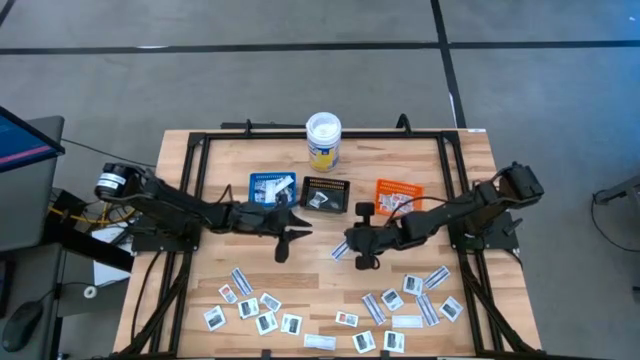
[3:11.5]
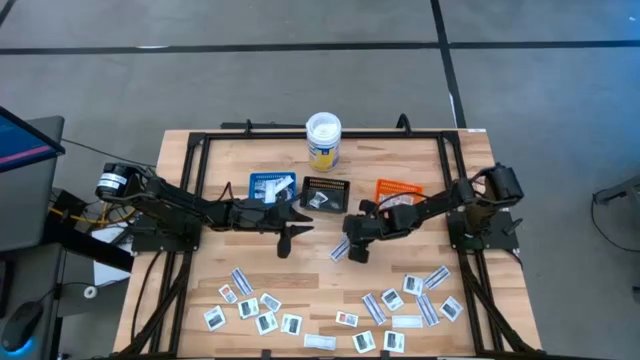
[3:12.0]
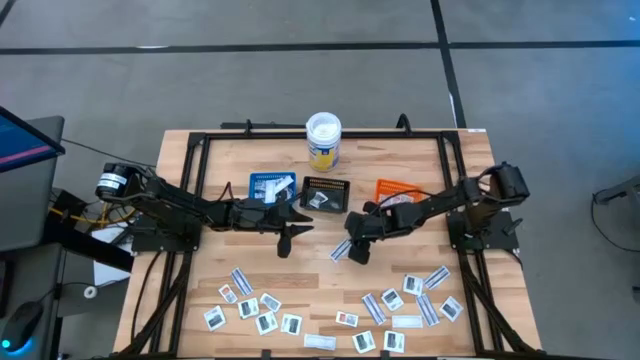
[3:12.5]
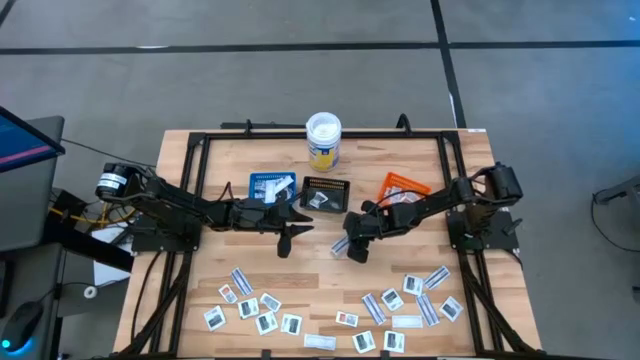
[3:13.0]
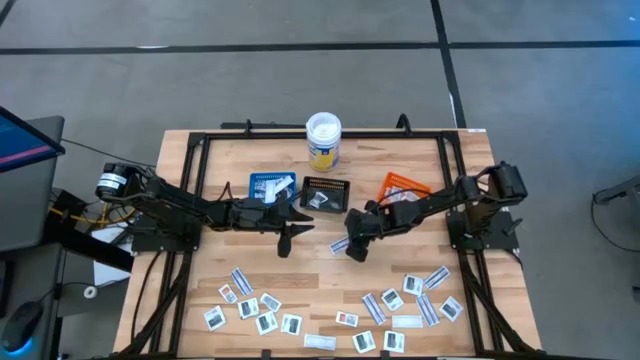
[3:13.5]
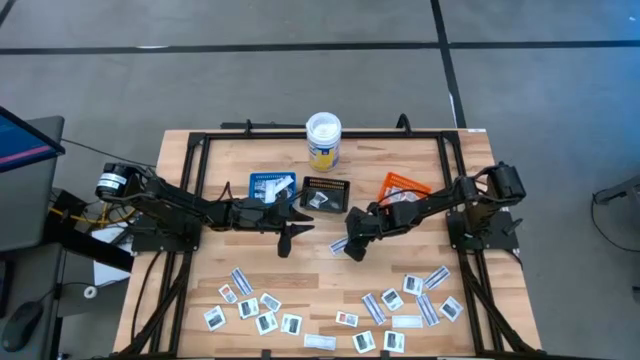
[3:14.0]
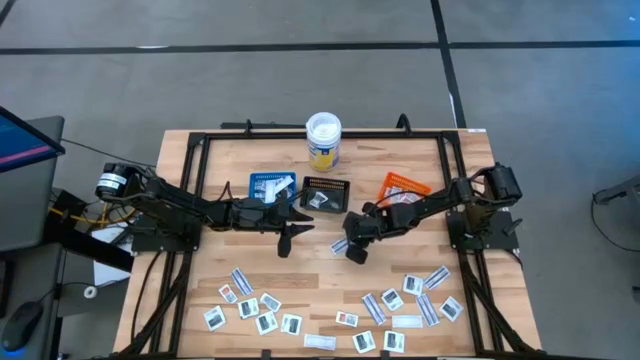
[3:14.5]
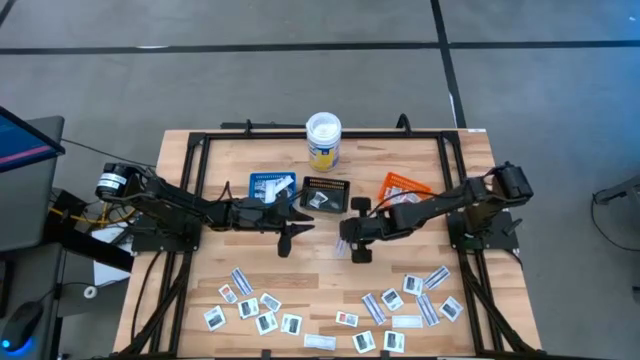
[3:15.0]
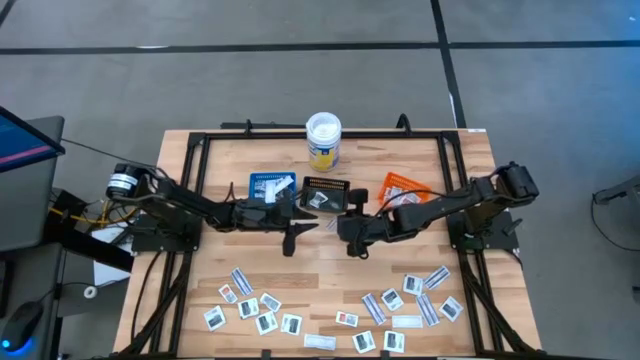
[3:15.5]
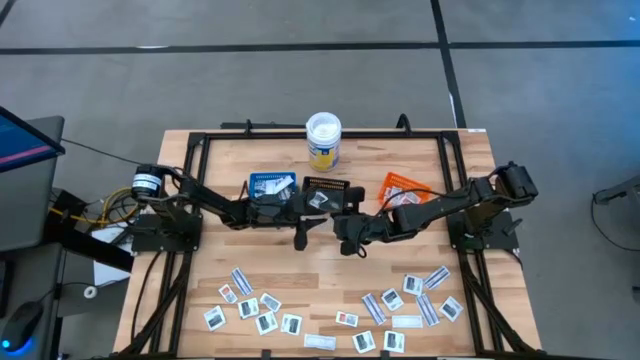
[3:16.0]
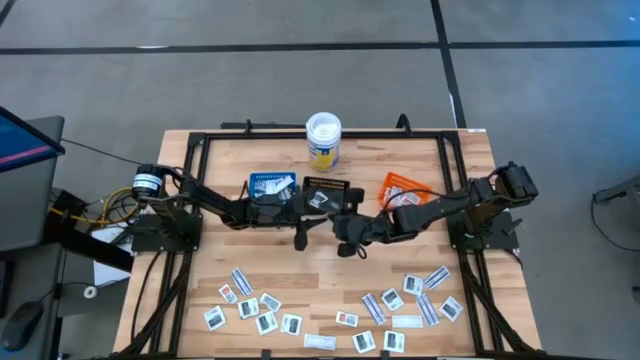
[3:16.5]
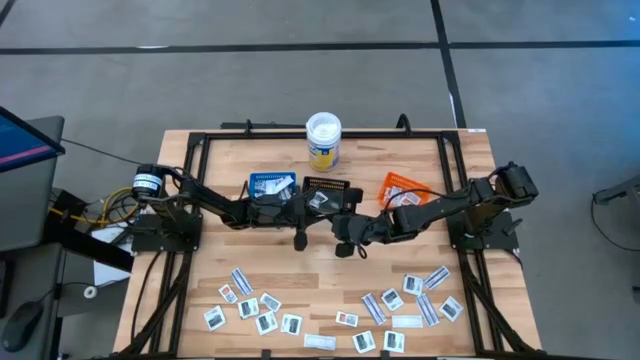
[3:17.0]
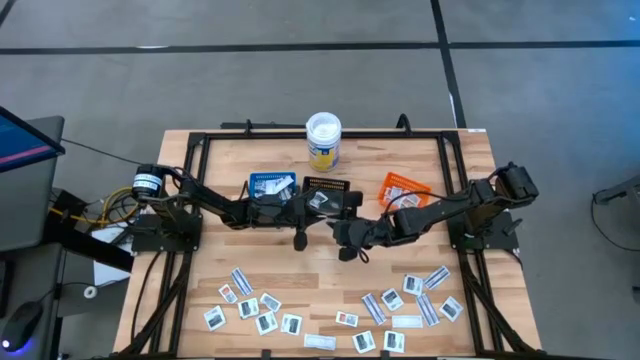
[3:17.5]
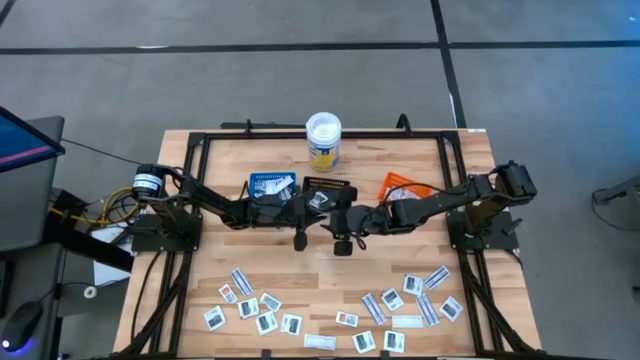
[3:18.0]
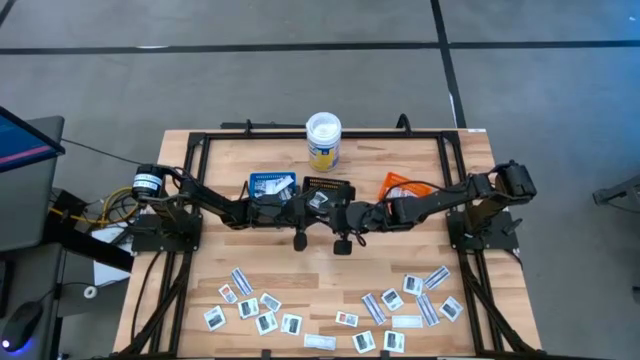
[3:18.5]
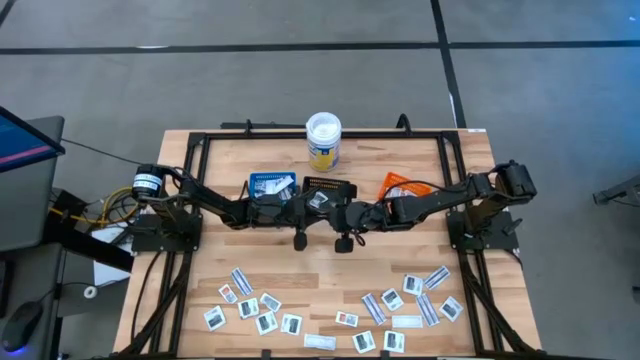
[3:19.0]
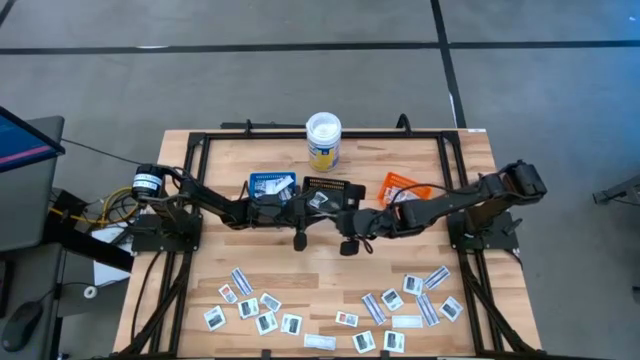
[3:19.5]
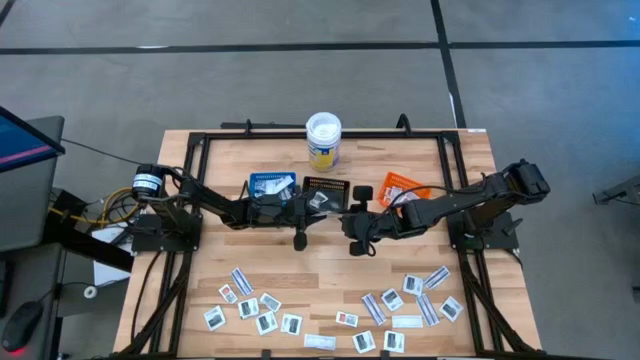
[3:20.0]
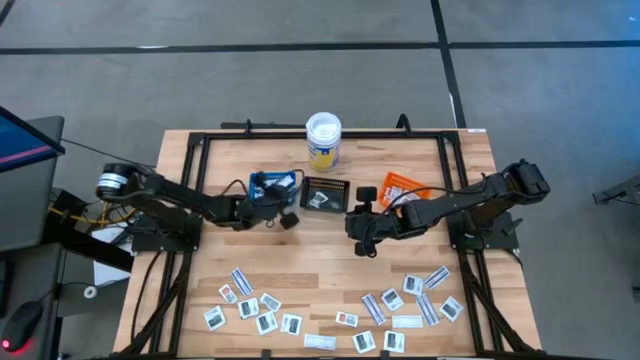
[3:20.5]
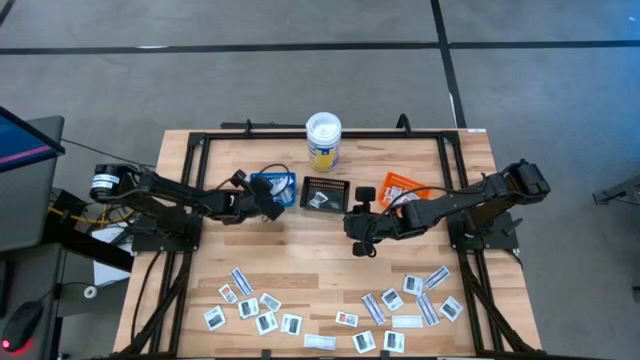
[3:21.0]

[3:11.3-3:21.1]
Task: Pick & Place First Aid Supplies
Put the blue bandage into the blue bin

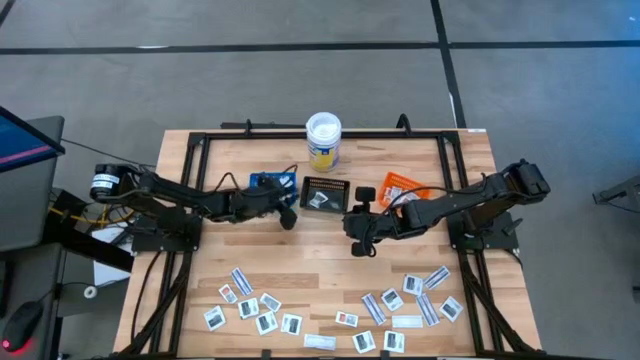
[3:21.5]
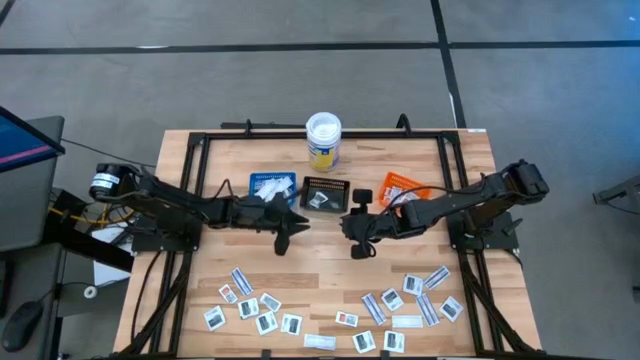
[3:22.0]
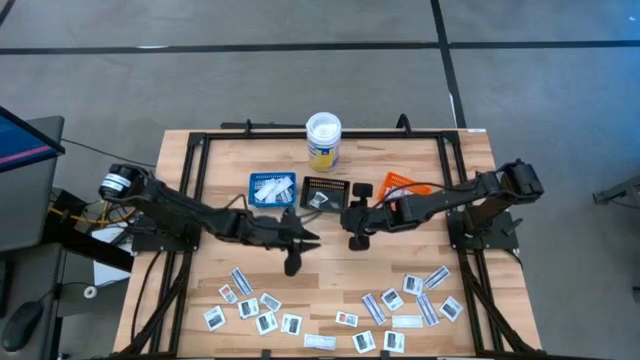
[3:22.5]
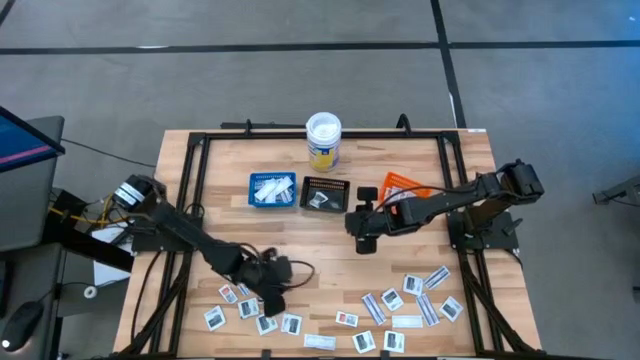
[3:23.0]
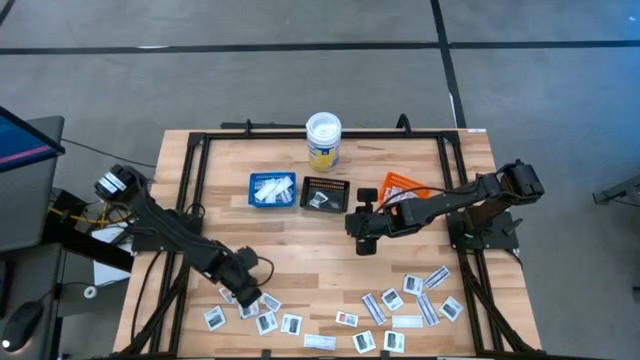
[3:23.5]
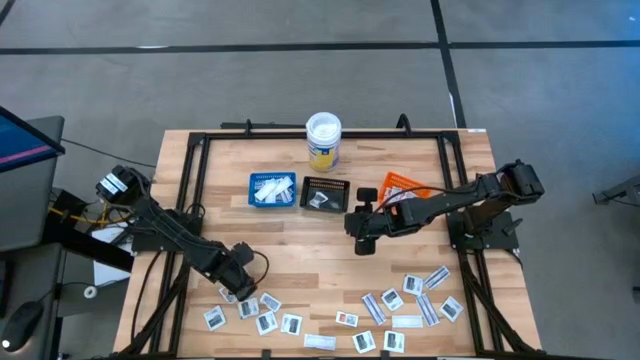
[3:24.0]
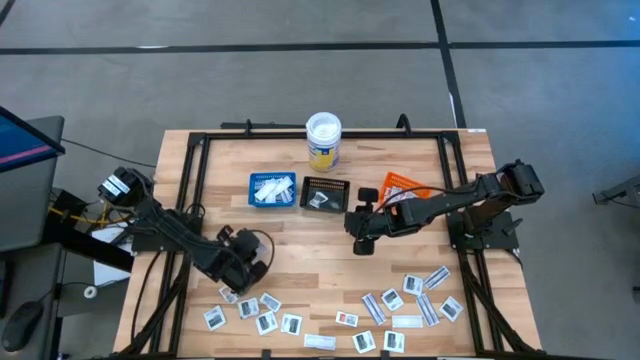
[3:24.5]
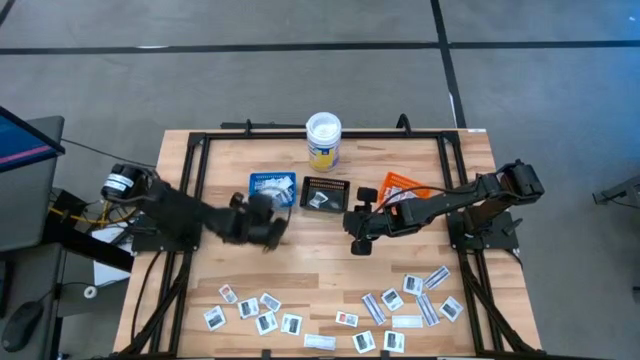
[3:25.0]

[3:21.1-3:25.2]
Put the blue bandage into the blue bin

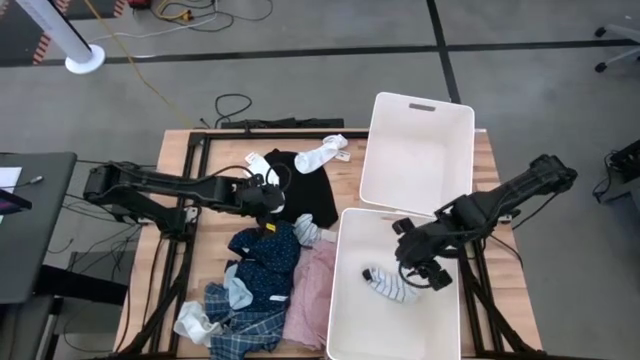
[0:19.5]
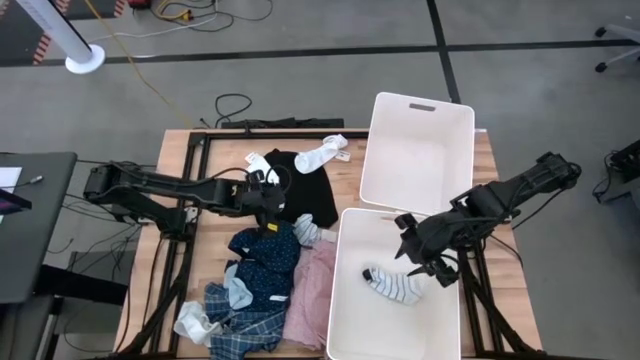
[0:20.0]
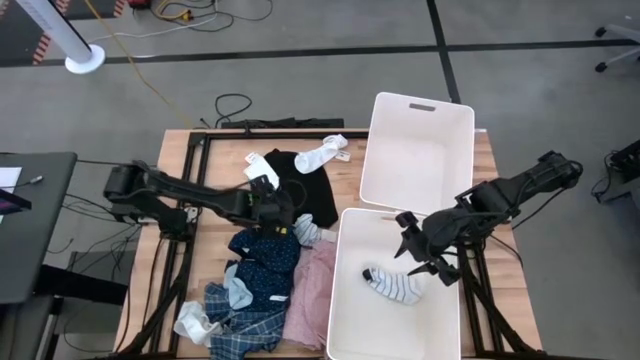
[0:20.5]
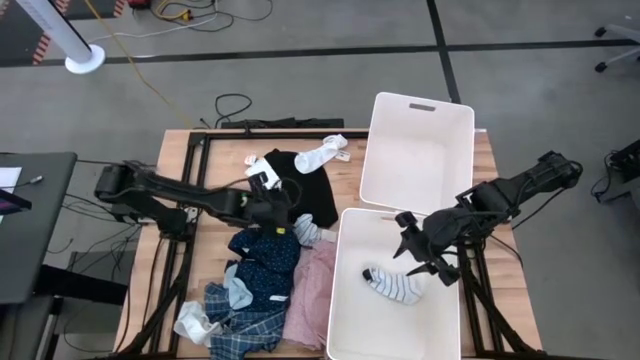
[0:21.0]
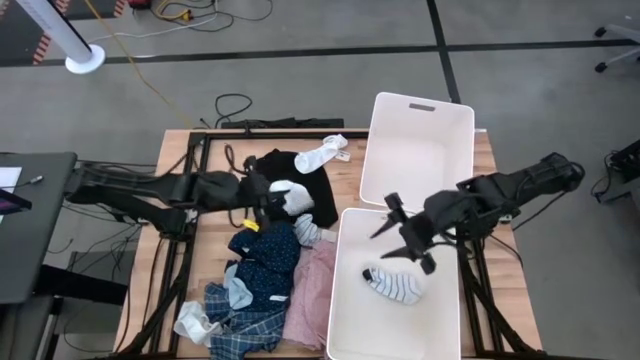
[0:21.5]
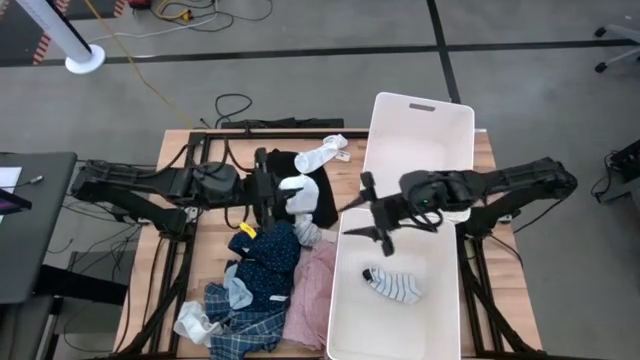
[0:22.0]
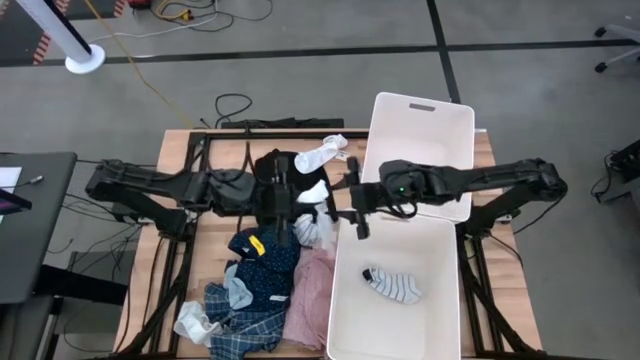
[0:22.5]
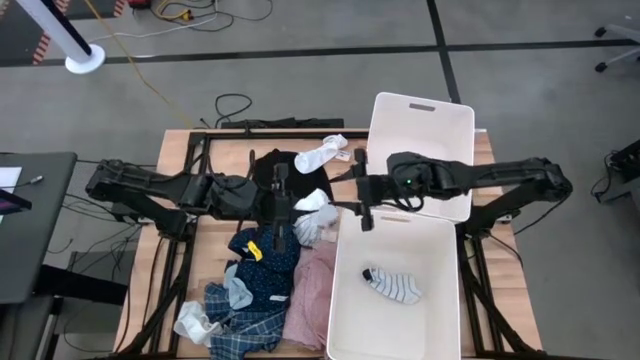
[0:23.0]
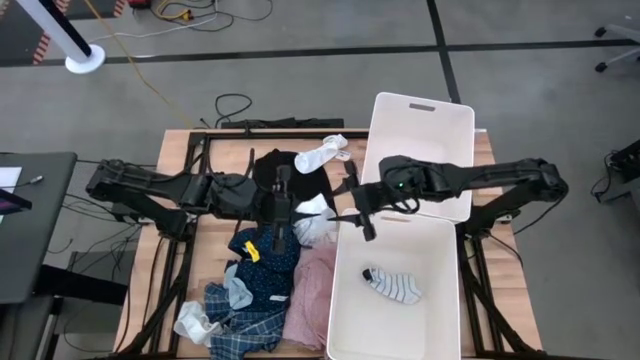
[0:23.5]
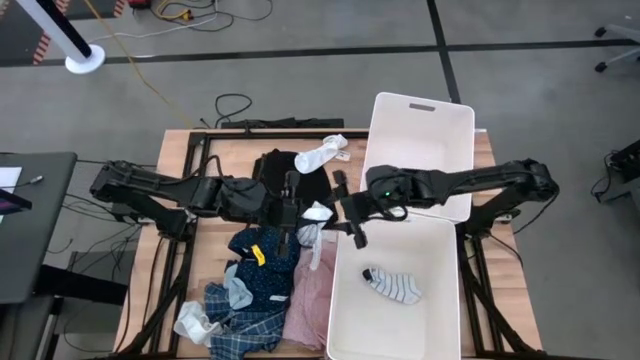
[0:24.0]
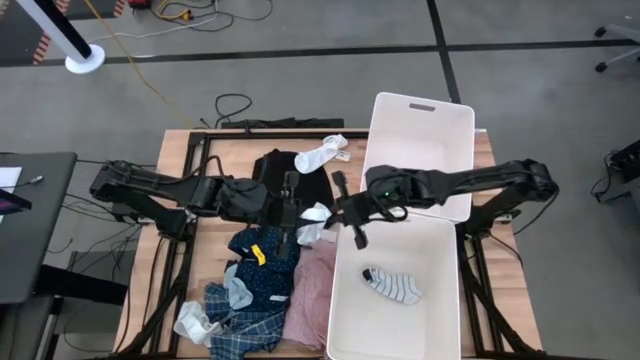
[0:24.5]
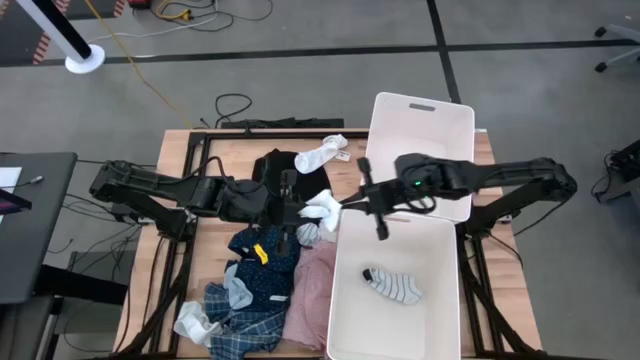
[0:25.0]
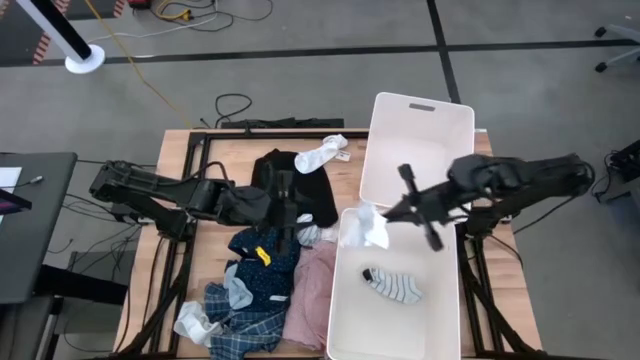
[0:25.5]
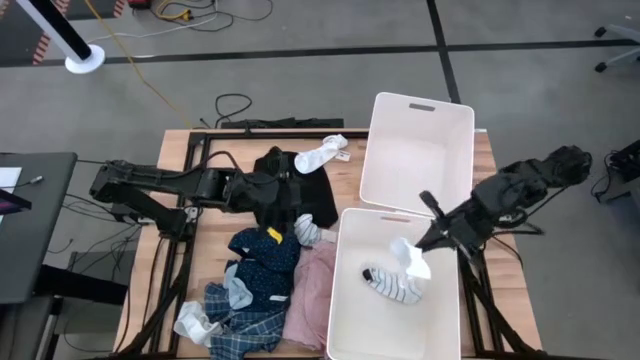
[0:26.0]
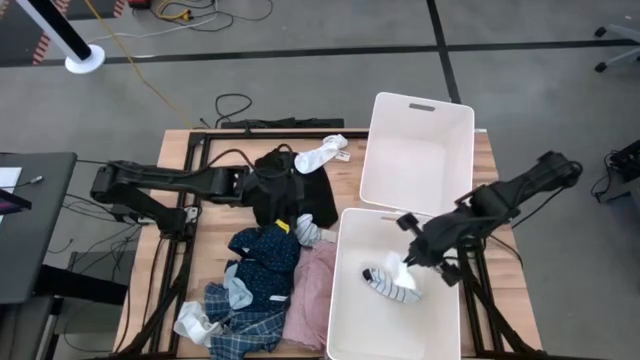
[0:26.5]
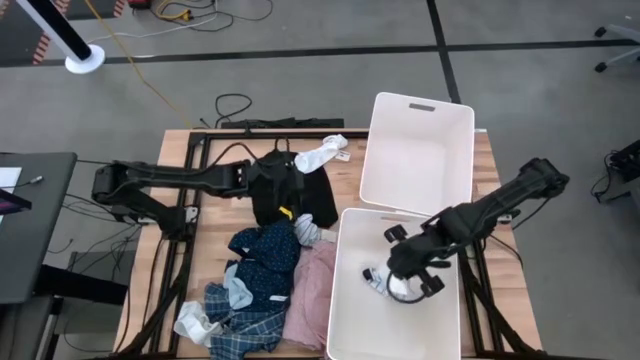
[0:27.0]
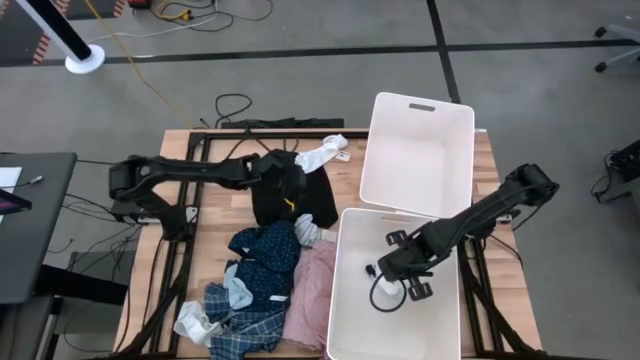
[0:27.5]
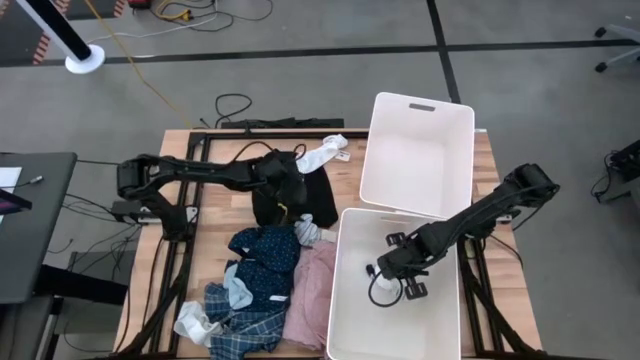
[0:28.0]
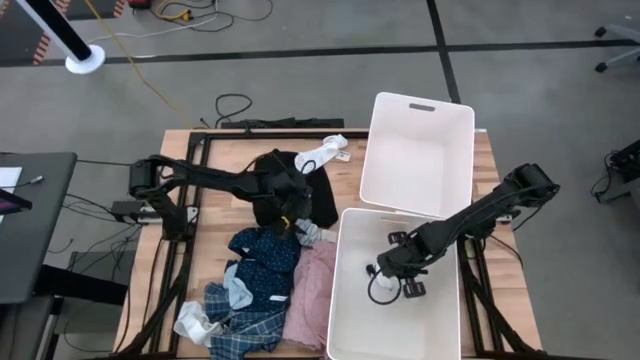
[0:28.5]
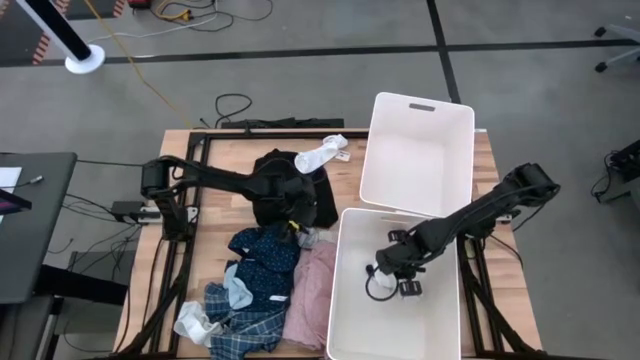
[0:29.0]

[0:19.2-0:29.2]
Task: Sort clothes
Put the middle white sock into the bottom laundry bin
